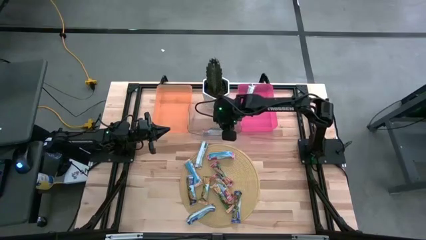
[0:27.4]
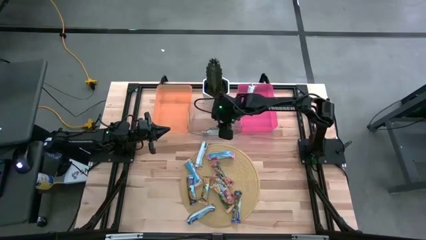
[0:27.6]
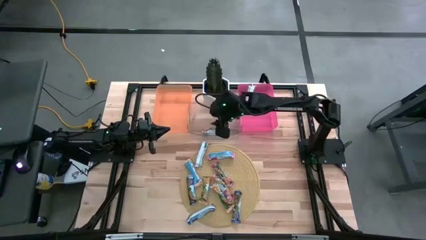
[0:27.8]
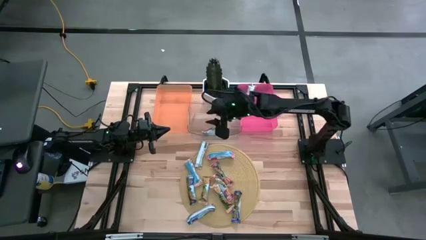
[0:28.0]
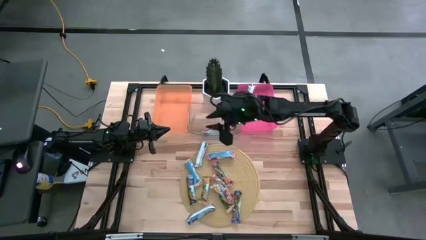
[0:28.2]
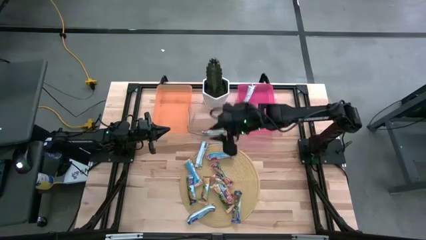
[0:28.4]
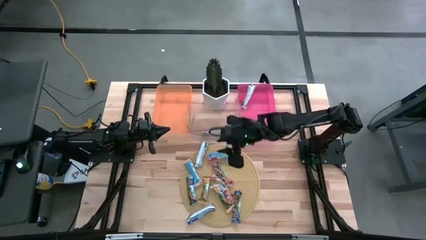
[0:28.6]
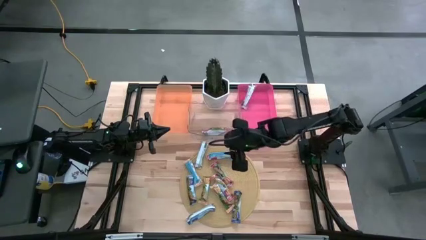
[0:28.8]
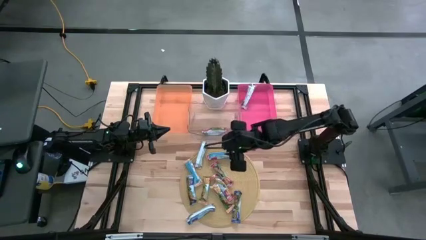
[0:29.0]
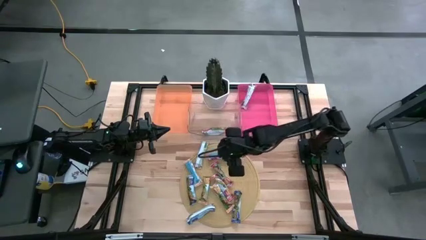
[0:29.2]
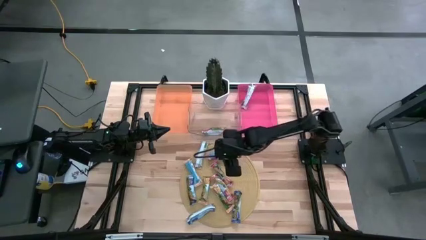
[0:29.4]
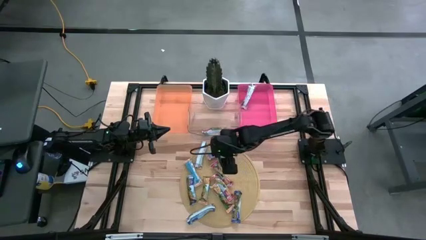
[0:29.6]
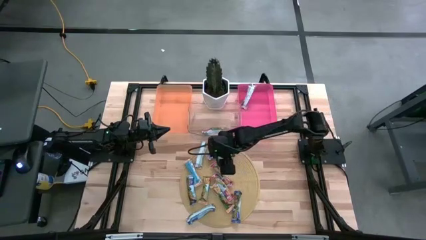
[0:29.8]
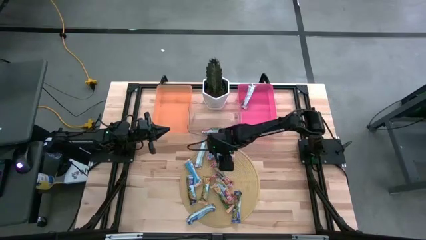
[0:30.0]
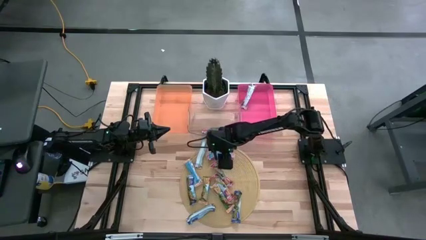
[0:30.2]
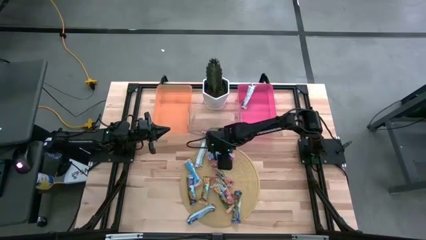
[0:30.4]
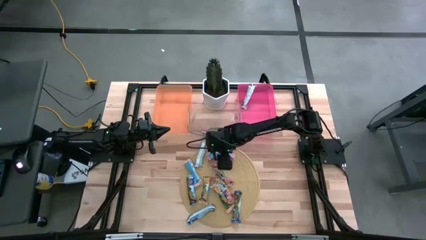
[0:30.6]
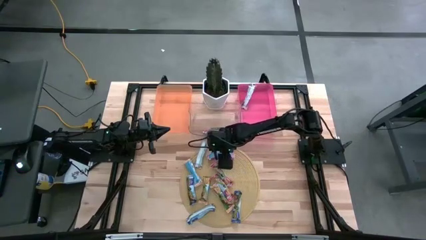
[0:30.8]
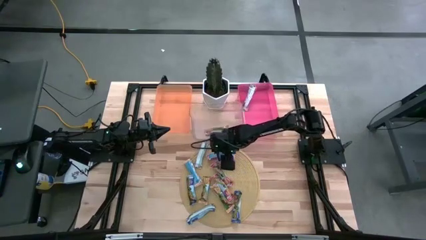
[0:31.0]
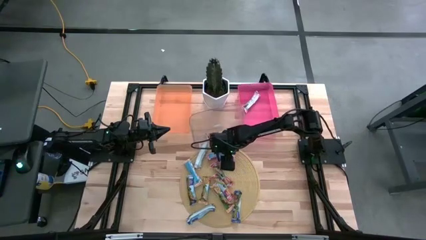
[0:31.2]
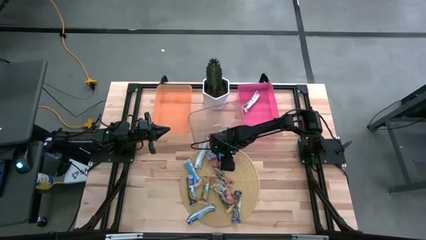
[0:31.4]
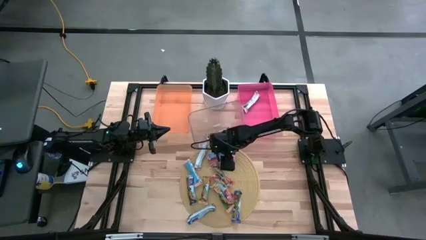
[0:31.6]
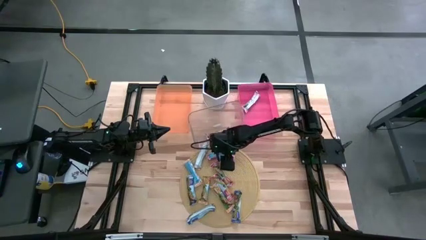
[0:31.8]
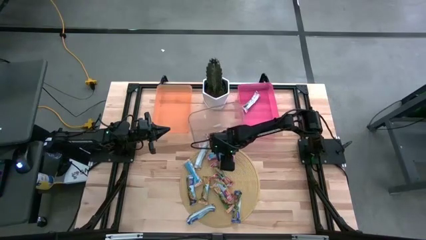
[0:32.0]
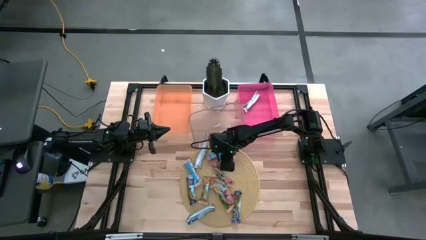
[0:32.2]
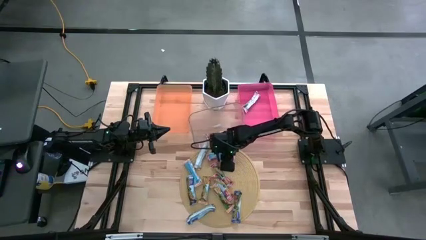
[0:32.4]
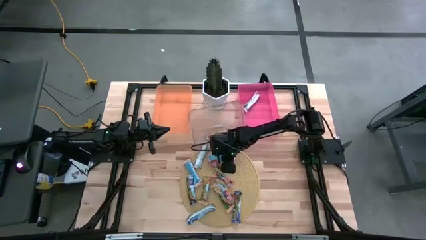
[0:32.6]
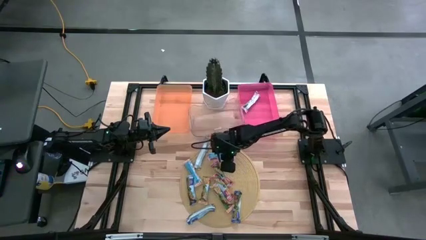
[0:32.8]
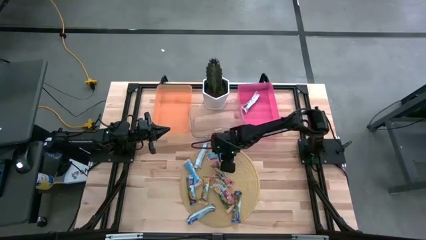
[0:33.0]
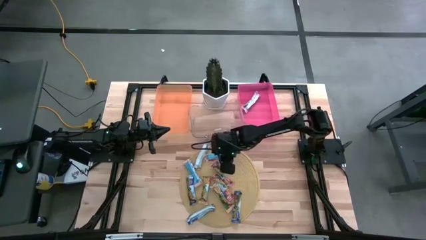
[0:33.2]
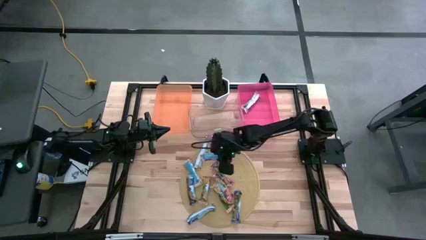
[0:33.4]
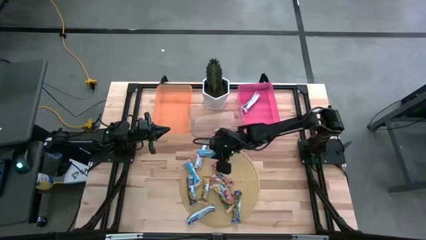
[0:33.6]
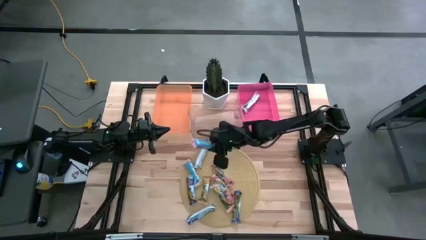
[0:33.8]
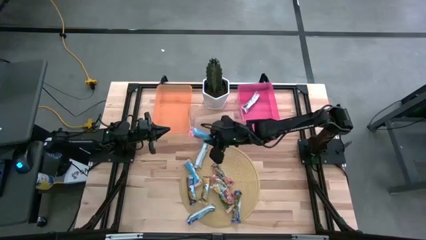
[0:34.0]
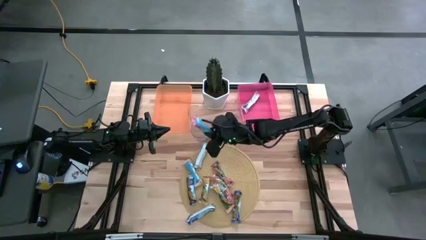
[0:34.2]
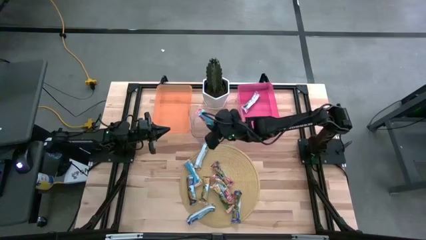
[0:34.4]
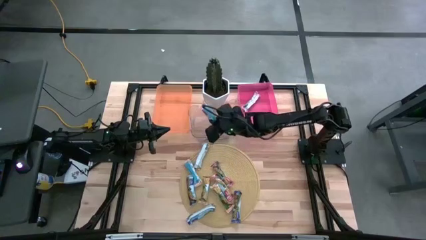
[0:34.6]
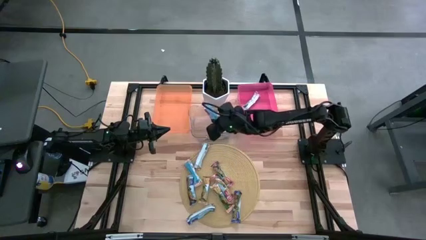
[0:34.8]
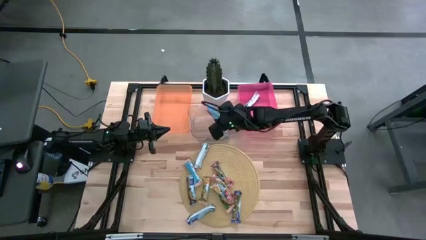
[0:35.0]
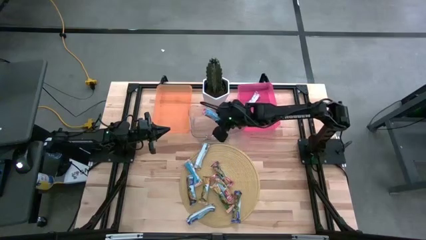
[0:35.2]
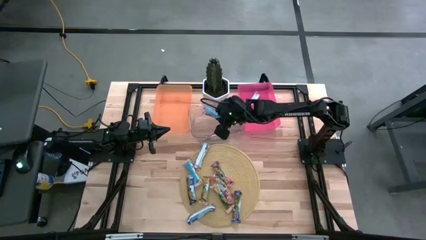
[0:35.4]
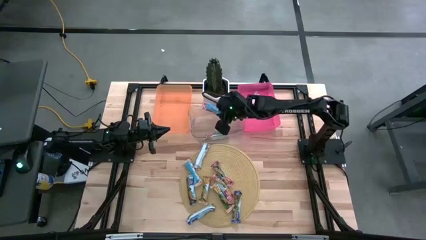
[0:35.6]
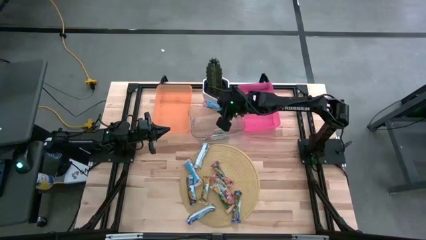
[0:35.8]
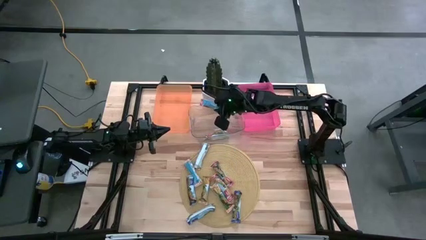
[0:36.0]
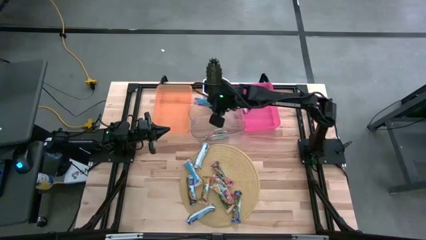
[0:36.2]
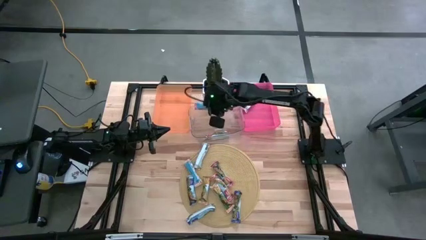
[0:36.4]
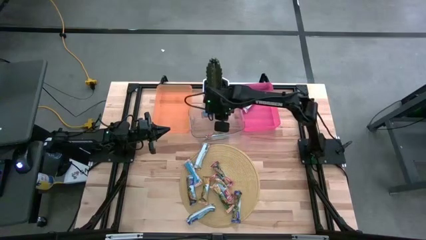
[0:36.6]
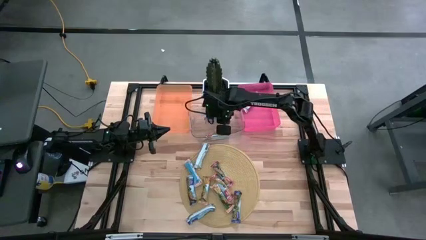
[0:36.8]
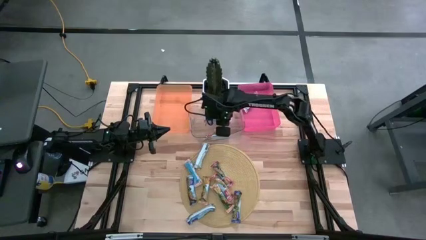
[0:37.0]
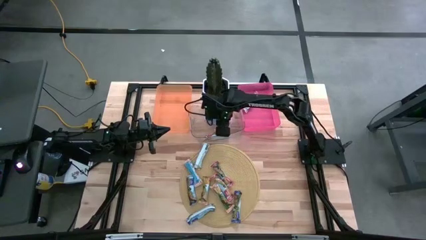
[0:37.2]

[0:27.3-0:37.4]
Task: Pick and place Granola Bars by type
Put the red granola bar into the transparent bin
